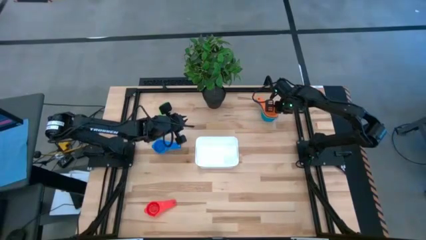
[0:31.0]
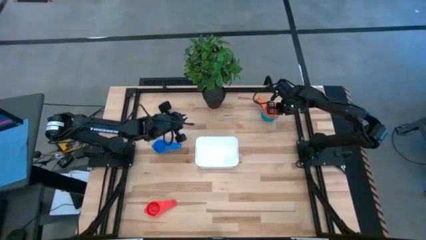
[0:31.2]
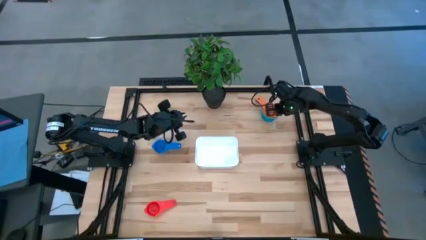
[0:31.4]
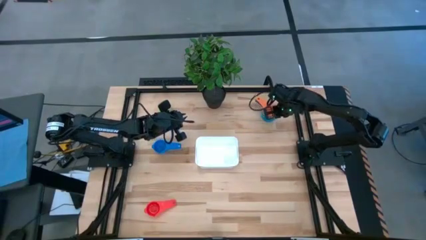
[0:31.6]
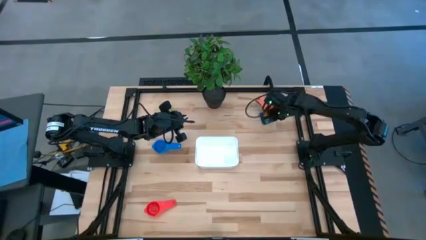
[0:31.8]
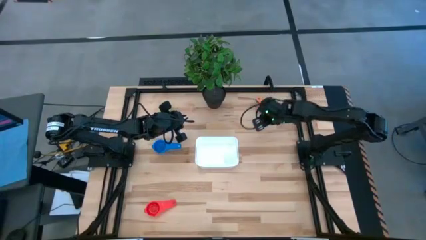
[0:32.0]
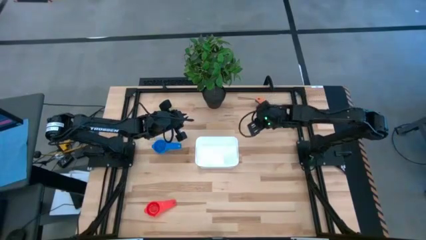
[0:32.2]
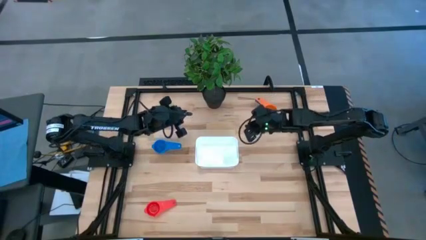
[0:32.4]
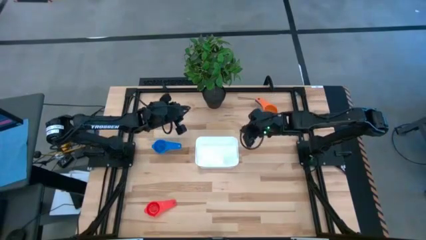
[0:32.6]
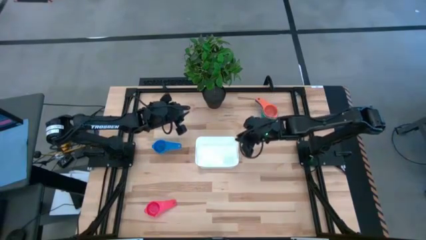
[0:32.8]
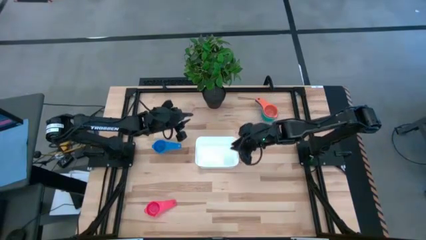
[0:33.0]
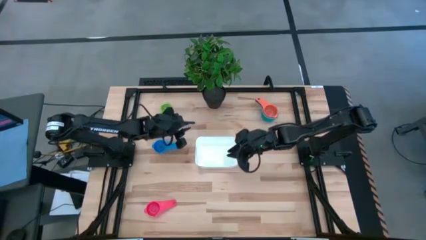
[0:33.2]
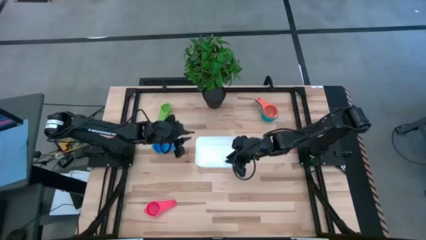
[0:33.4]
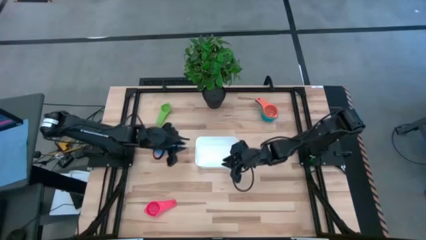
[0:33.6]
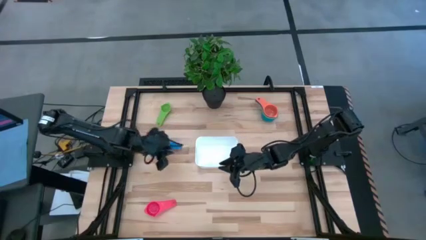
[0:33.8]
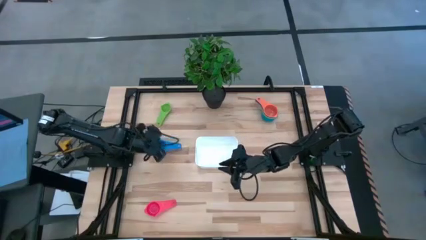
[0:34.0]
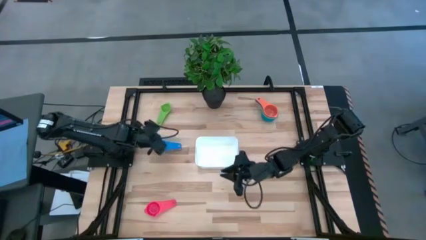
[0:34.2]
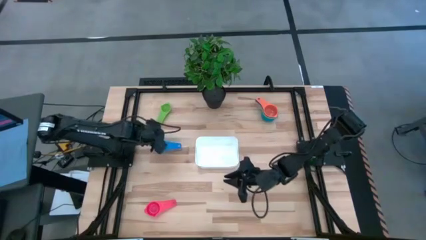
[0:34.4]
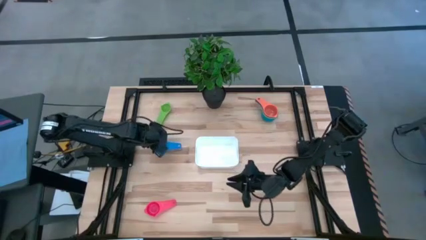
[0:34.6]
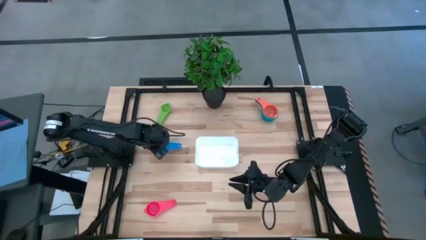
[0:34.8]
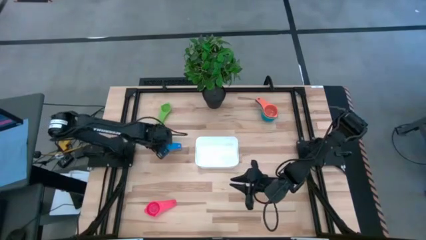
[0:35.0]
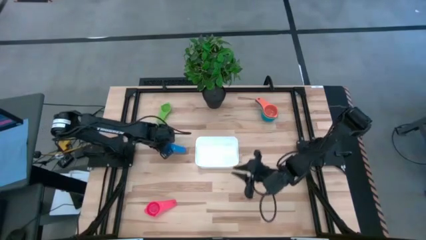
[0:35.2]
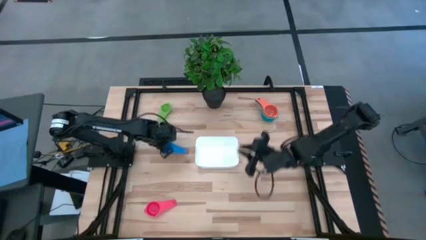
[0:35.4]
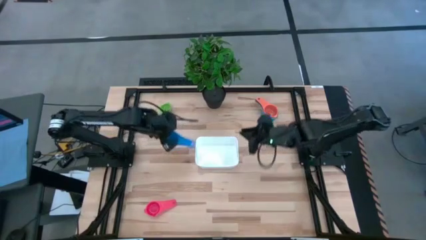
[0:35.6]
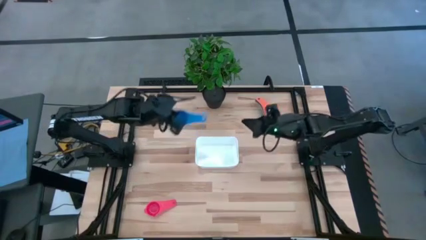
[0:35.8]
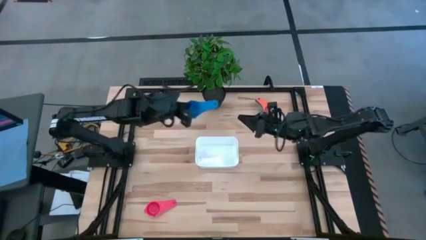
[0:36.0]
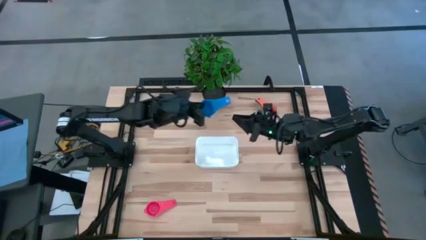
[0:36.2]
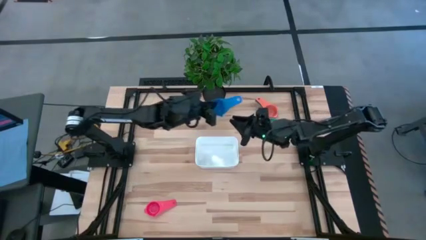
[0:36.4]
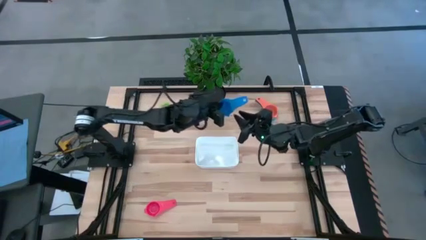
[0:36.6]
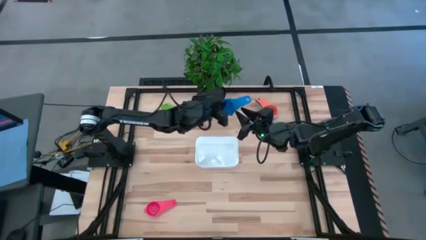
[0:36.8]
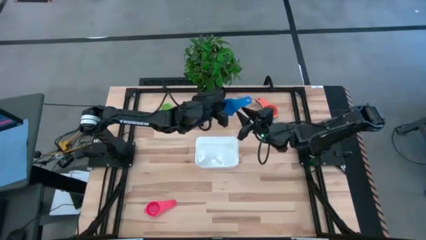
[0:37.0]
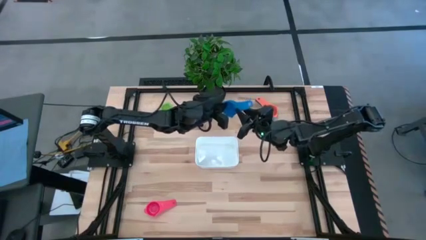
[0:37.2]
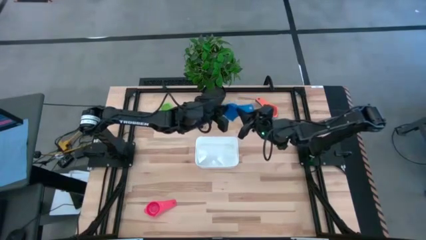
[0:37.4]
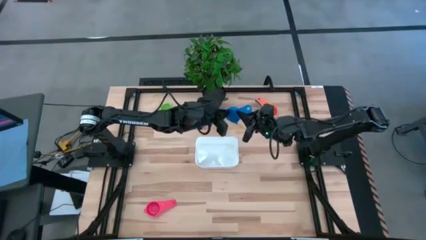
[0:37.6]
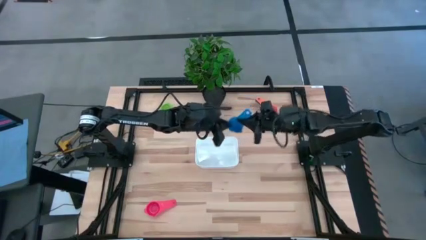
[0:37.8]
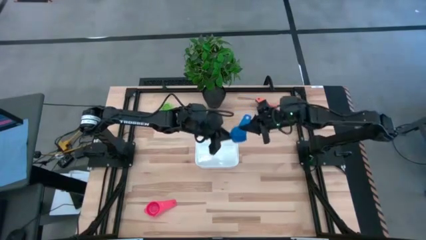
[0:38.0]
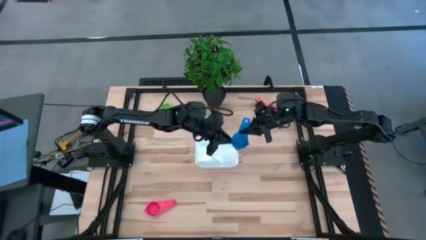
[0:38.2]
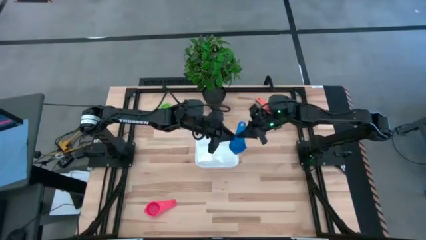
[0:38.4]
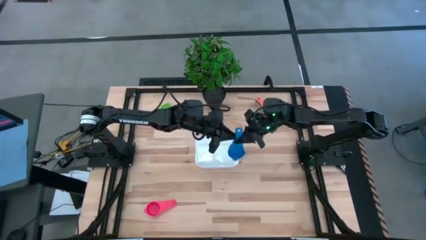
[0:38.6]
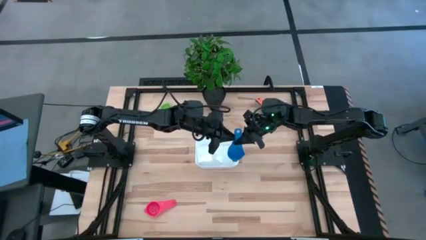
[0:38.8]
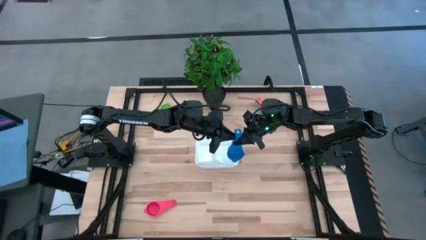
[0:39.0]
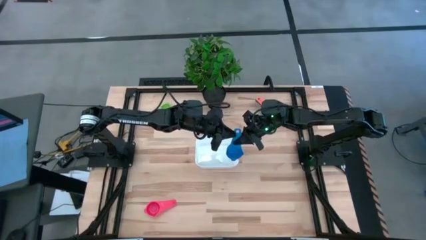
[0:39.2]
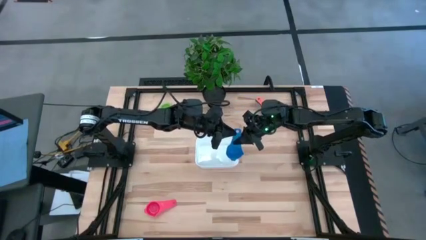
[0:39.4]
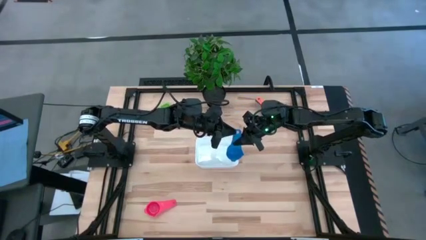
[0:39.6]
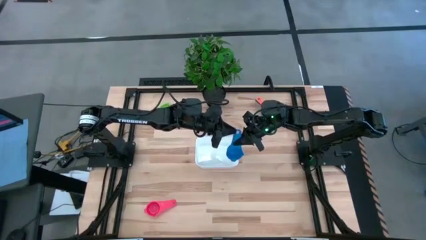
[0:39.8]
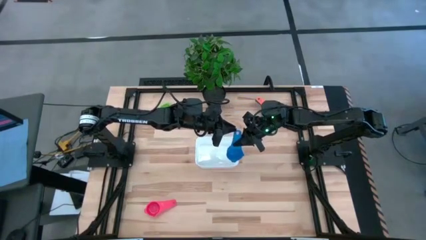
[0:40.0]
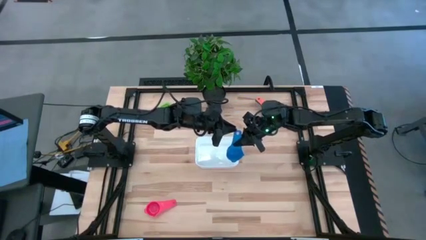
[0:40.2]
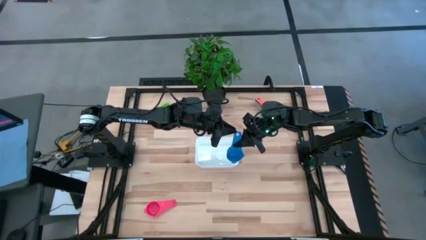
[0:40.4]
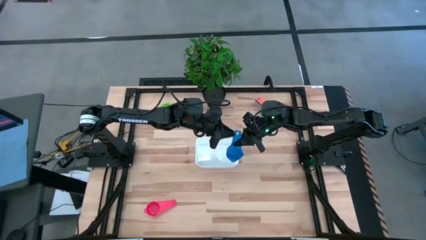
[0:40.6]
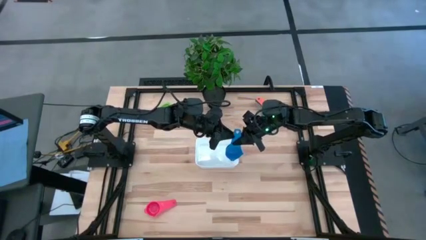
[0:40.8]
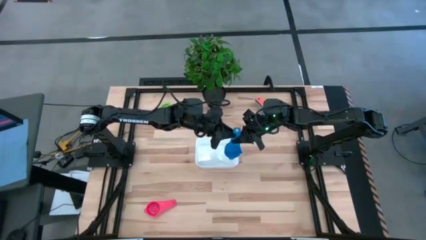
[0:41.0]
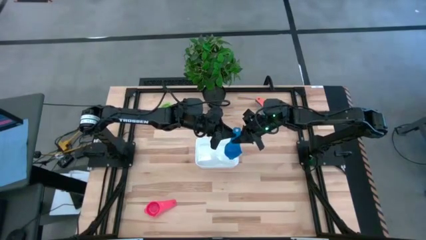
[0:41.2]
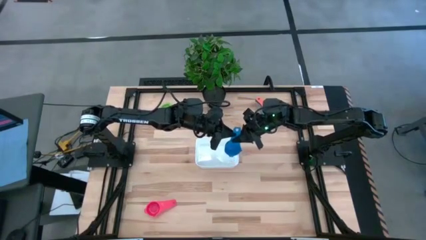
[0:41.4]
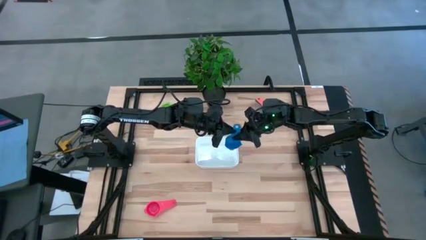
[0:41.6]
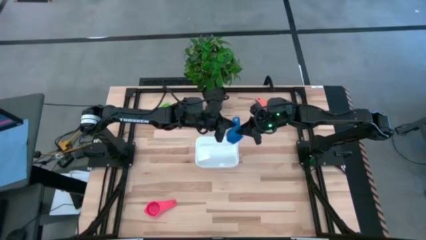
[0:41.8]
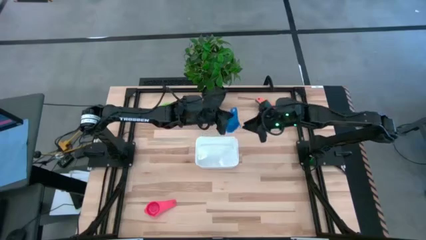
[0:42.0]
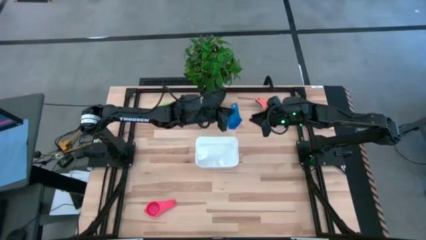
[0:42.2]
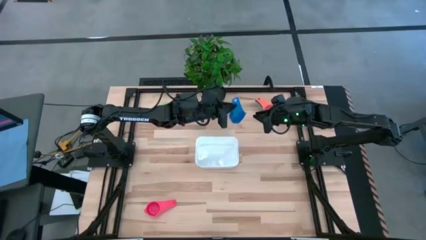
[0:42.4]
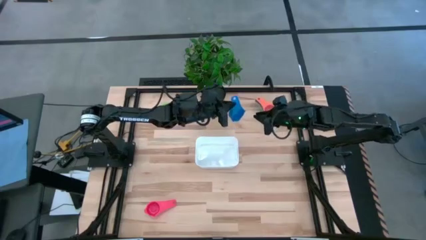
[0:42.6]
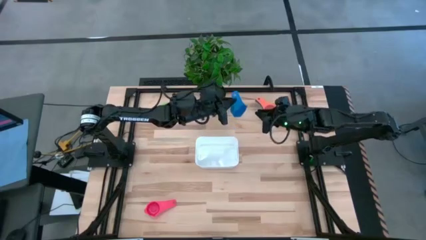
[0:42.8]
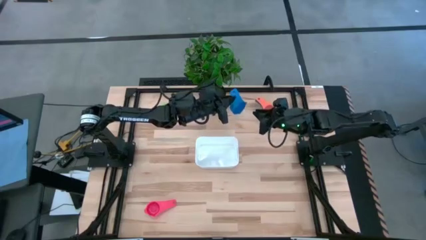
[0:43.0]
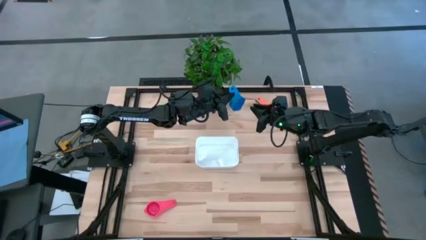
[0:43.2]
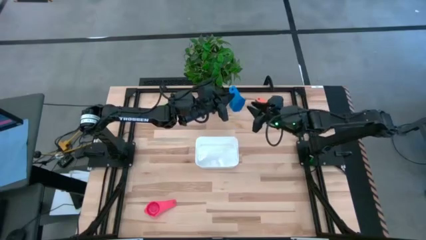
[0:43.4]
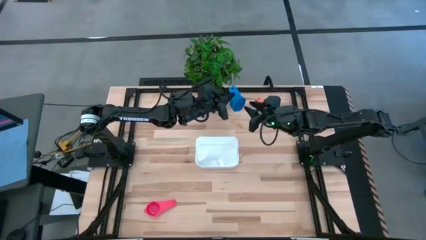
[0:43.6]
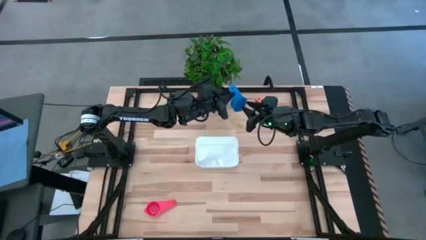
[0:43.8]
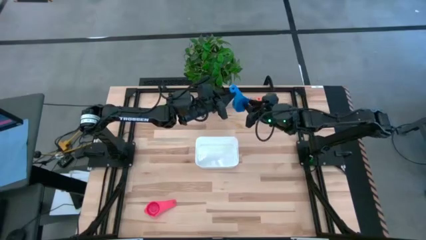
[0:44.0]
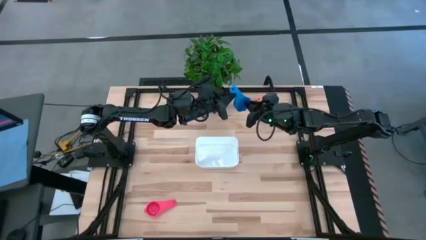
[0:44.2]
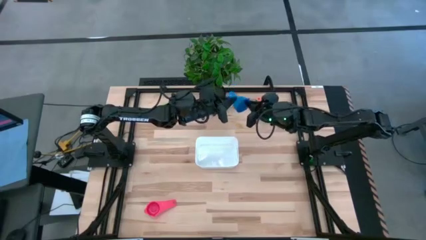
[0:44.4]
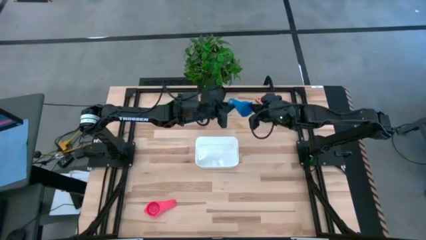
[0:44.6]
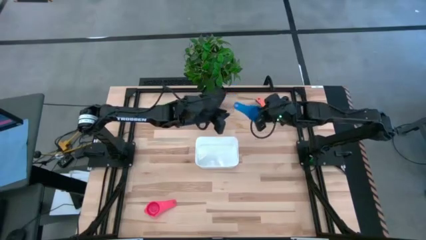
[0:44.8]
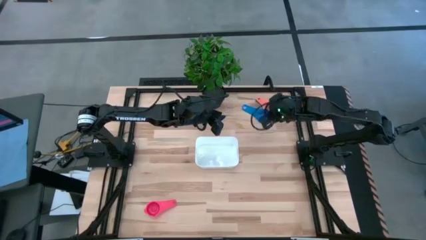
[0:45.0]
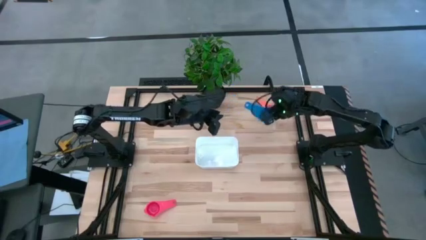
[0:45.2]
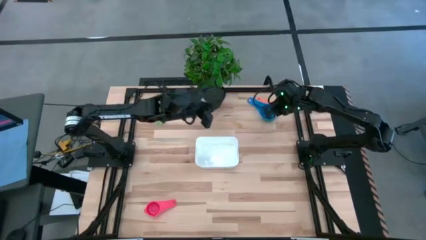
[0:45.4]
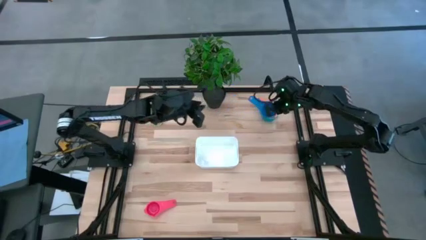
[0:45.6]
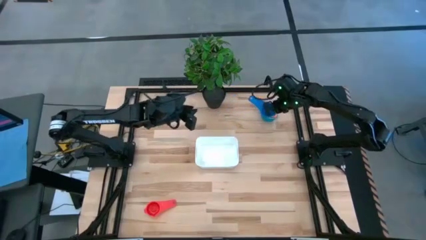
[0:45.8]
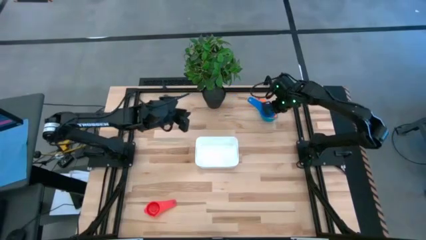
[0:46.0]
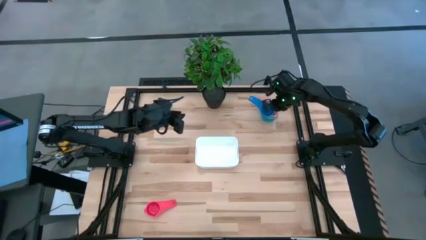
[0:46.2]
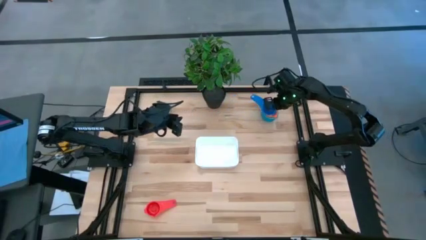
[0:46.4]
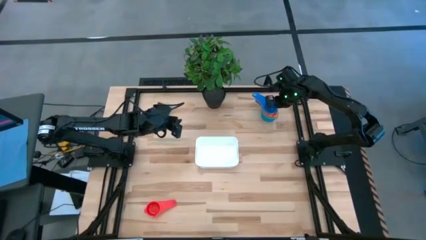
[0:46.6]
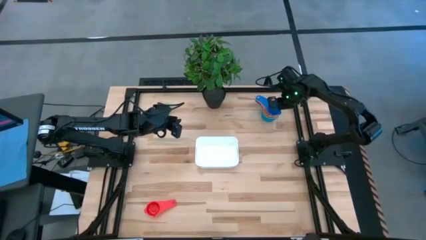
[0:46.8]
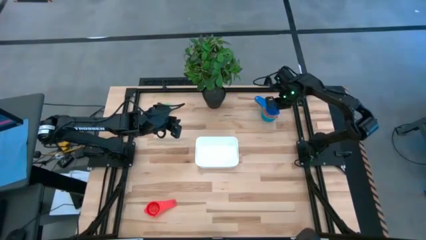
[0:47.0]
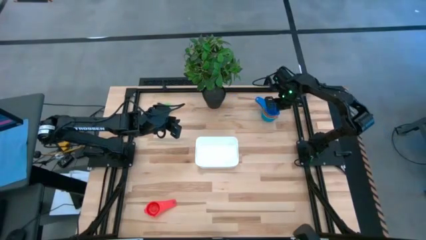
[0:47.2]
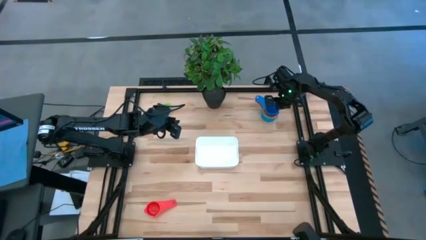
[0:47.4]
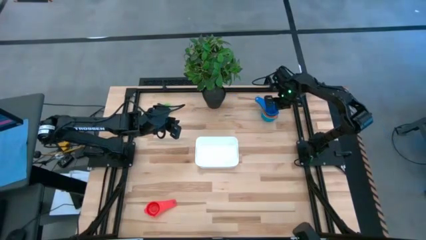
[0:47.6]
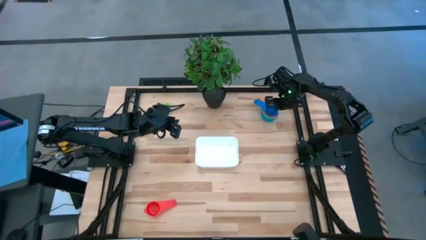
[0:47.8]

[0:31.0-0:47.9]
Task: Nest measuring cups in basket
Stack the blue measuring cup on top of the orange measuring cup
